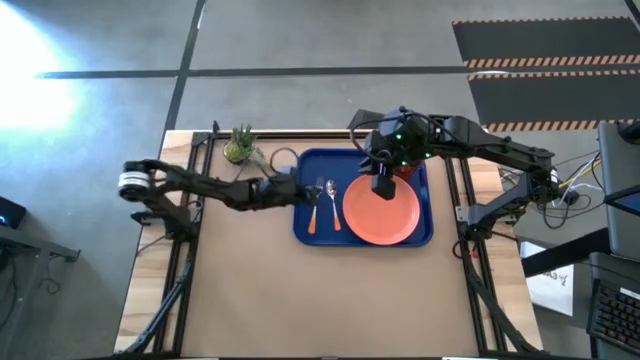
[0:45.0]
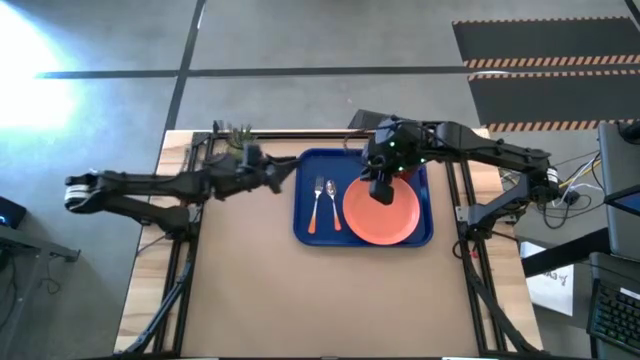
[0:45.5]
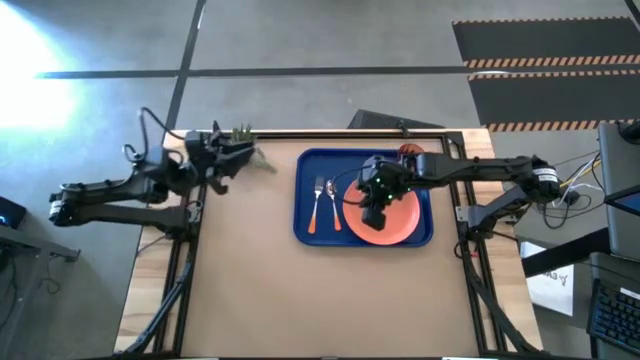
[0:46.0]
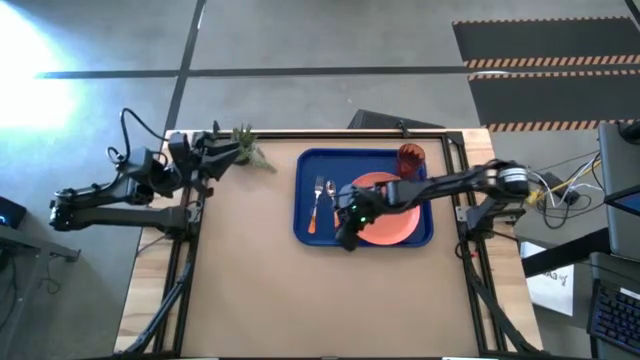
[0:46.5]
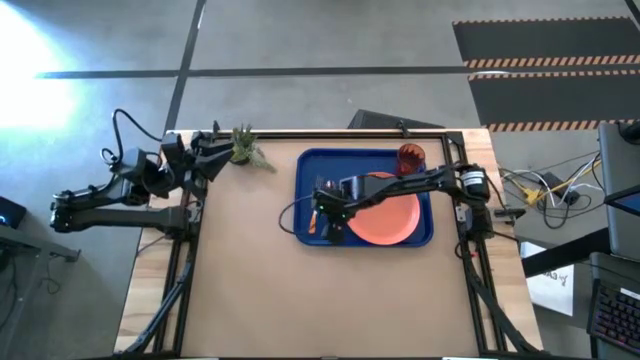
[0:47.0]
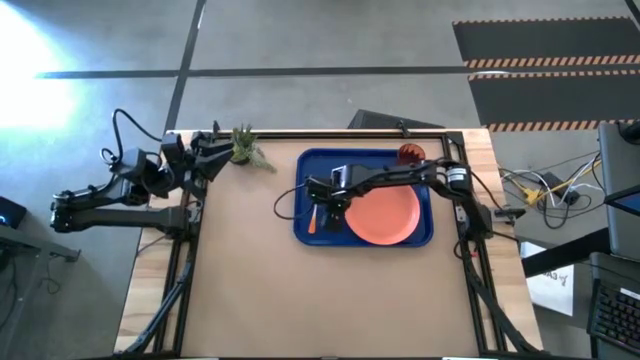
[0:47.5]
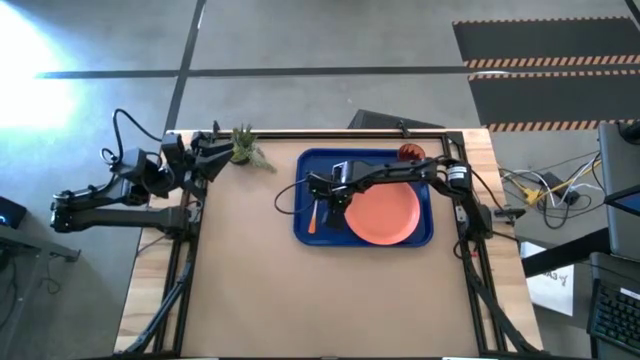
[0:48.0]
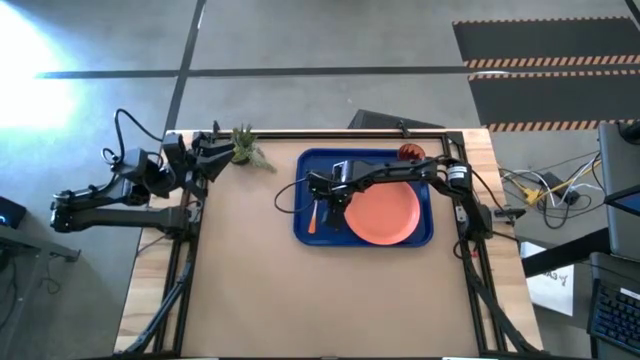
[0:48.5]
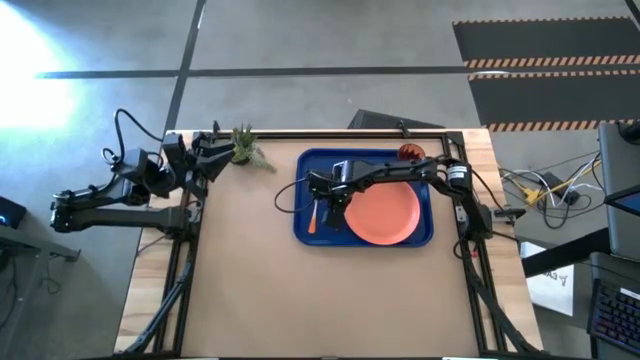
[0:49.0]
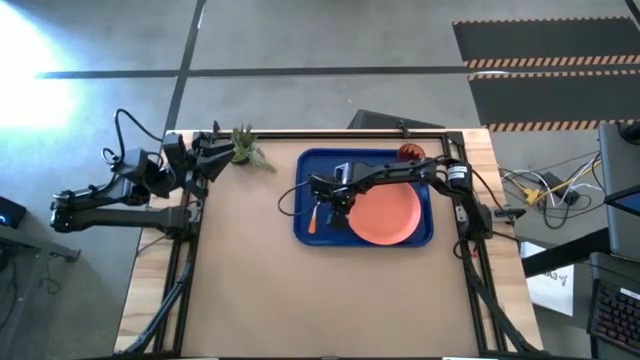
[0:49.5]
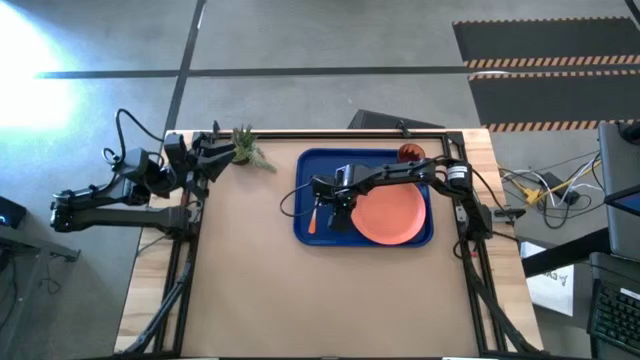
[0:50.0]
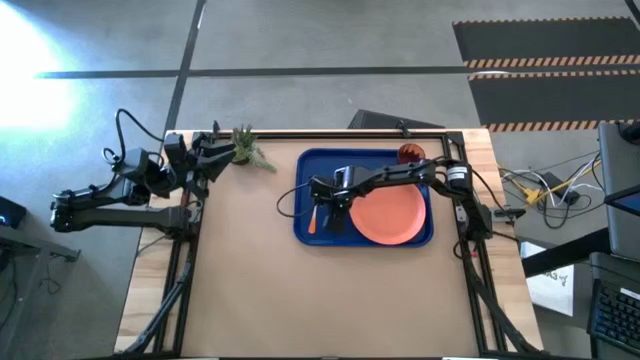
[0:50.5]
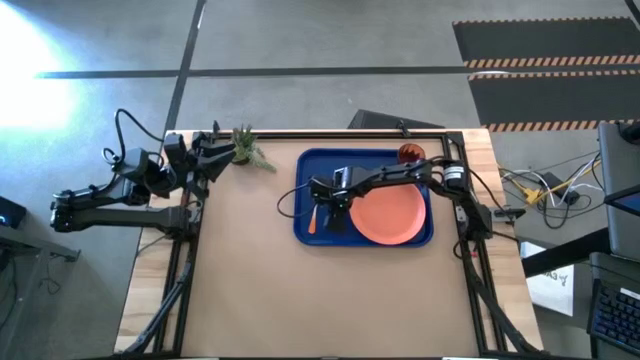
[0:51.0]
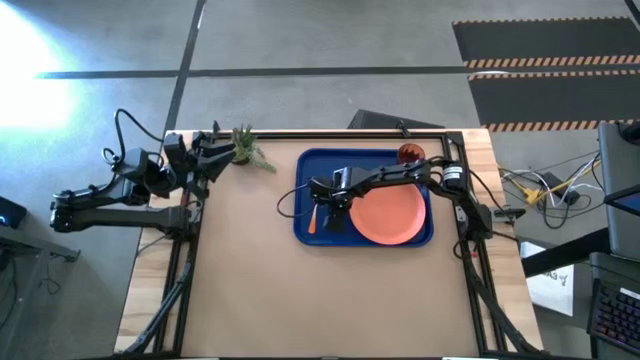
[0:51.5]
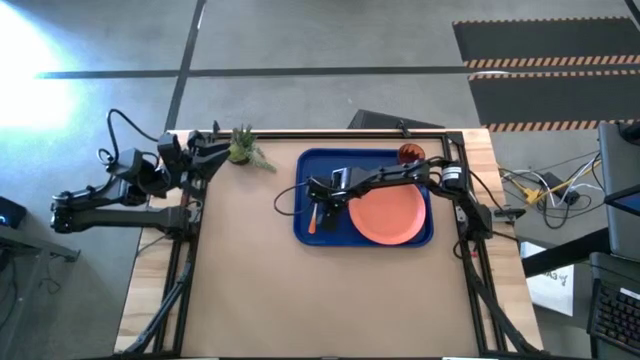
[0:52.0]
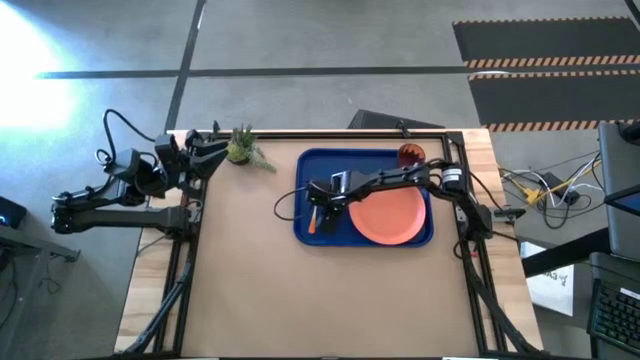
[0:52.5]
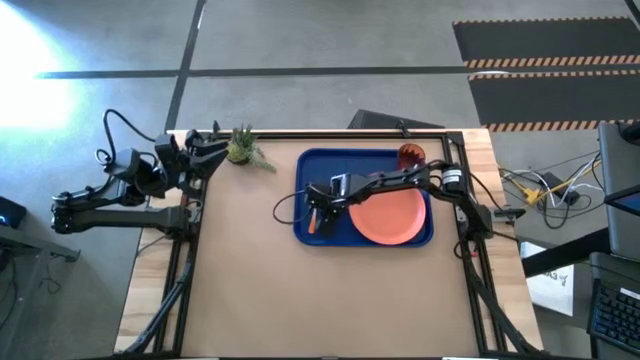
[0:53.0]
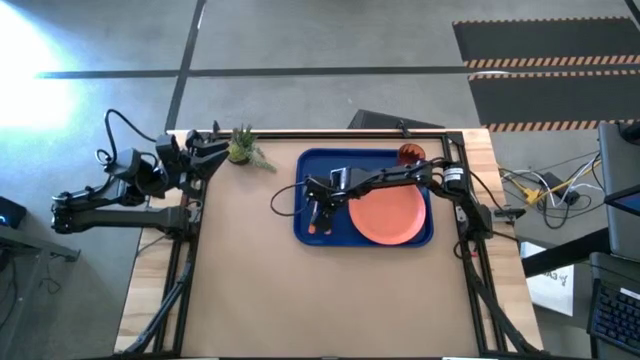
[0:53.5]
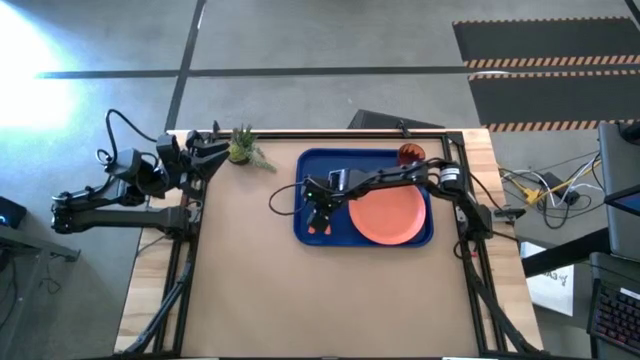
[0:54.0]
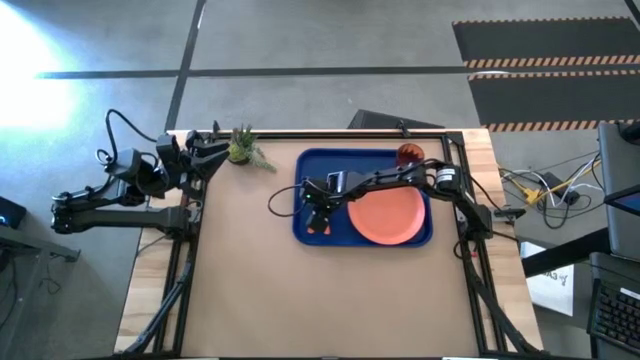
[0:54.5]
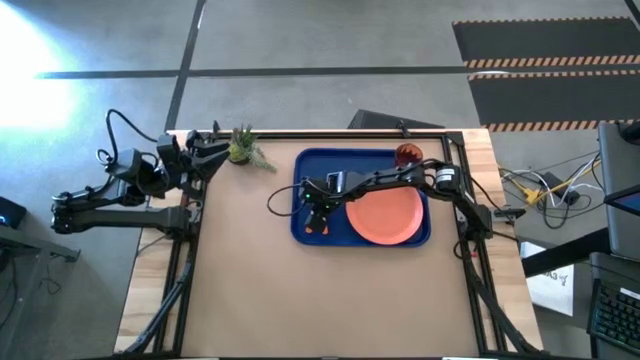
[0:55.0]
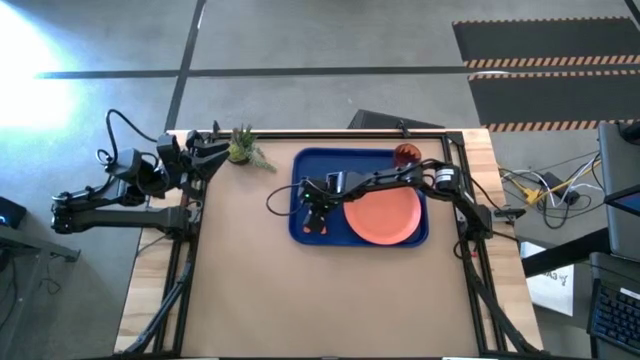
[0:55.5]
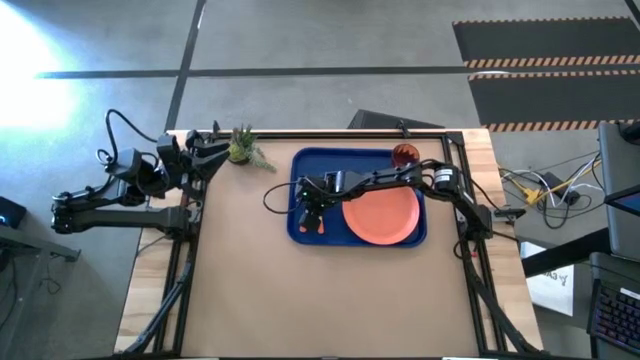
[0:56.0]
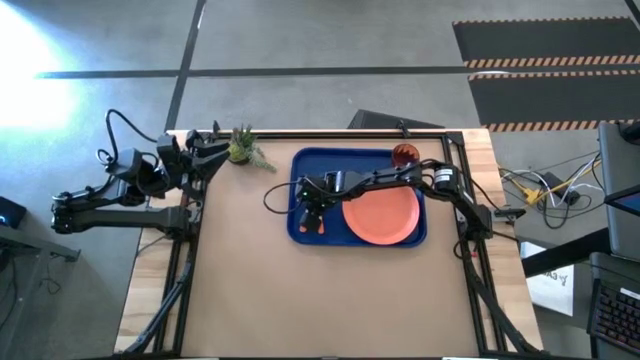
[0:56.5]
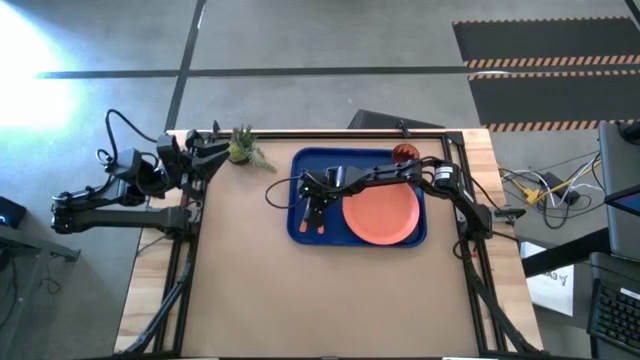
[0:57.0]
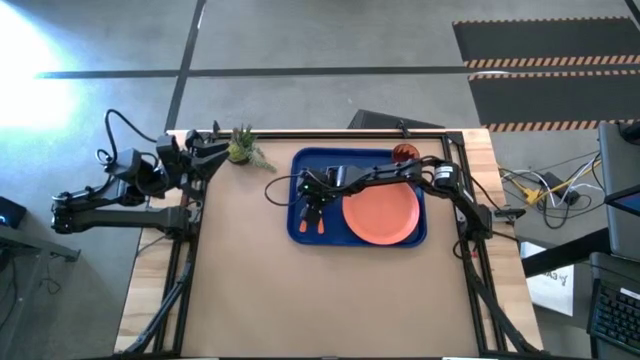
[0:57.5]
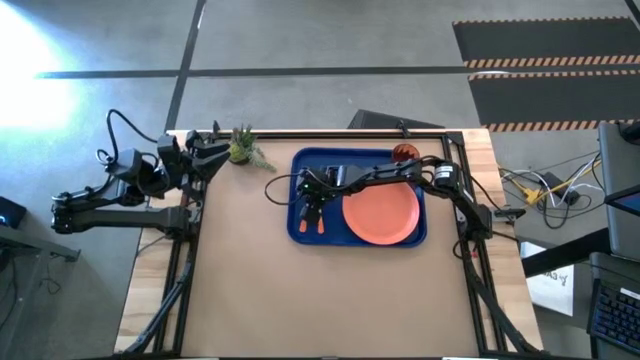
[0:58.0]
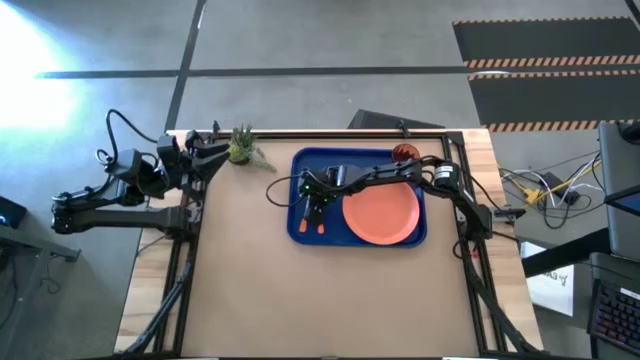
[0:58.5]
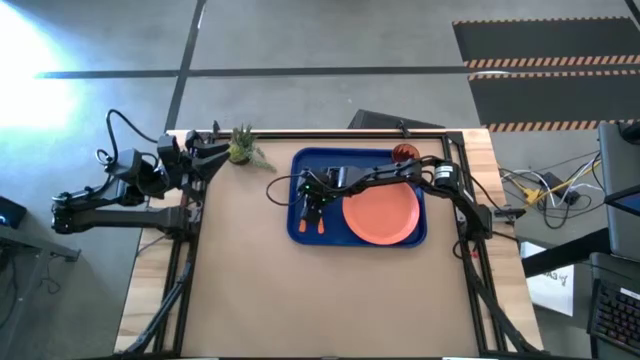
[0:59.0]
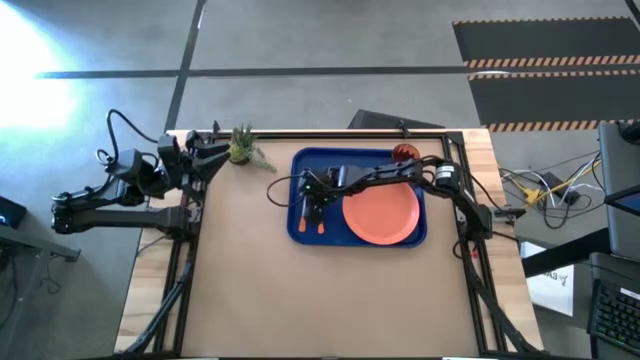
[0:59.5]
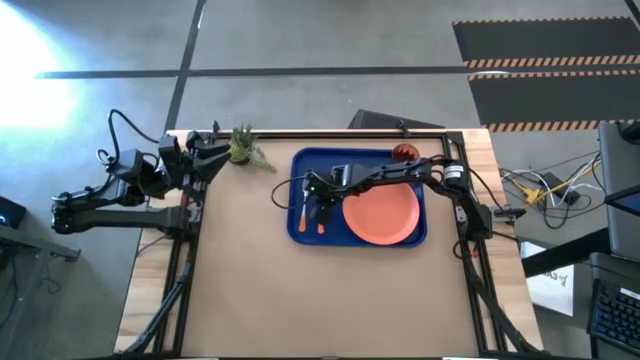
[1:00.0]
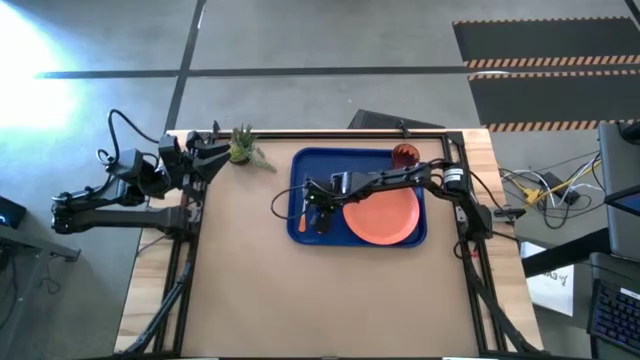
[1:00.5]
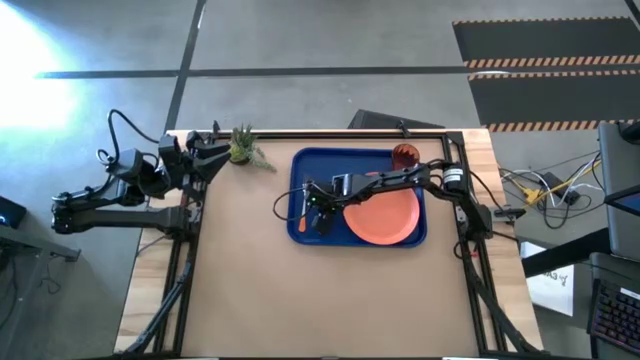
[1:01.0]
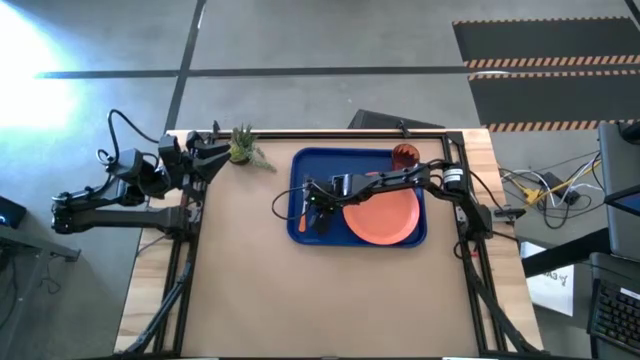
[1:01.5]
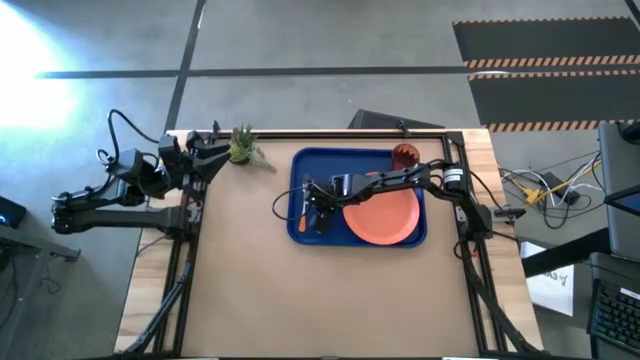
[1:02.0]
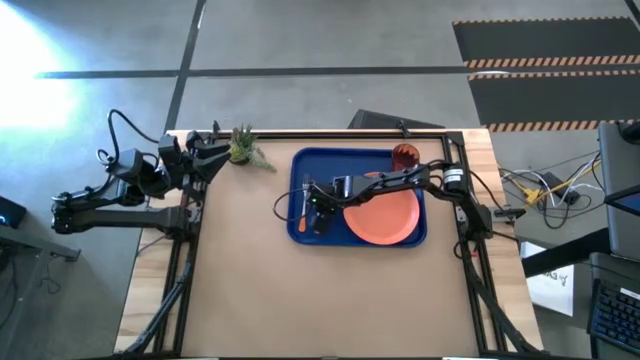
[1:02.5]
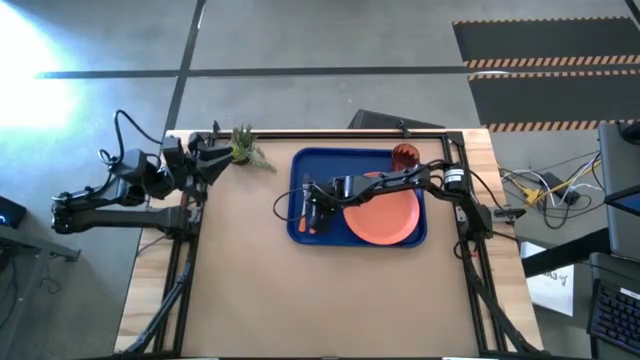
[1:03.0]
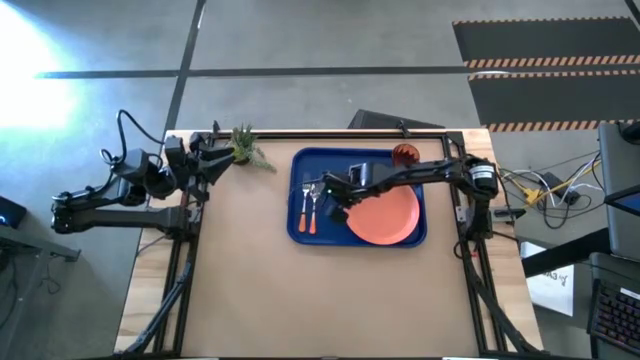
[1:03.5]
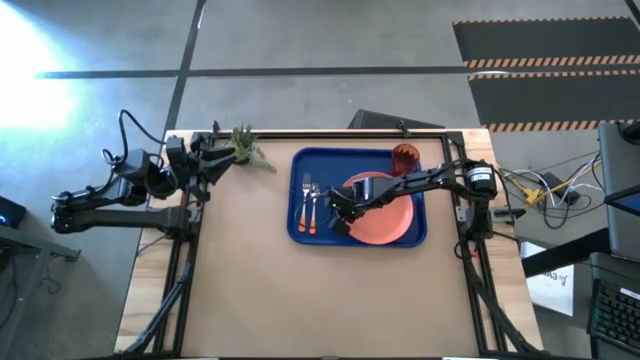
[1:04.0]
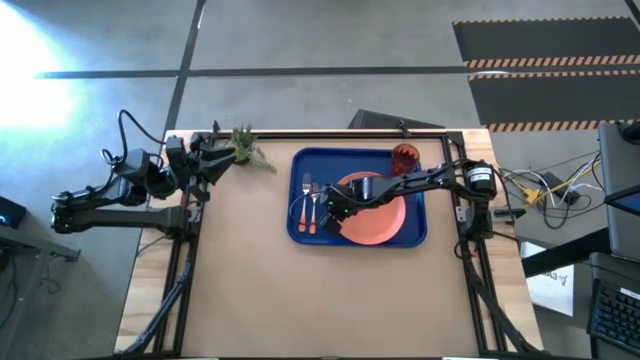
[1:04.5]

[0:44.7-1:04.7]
Task: Pick and place plate/cup/fork/spoon on tray
Adjust the silverware and plate on the blue serving tray

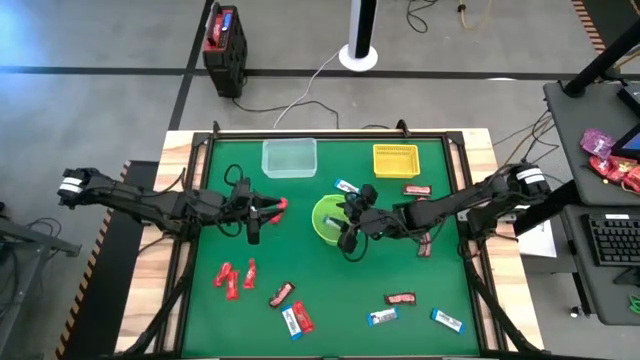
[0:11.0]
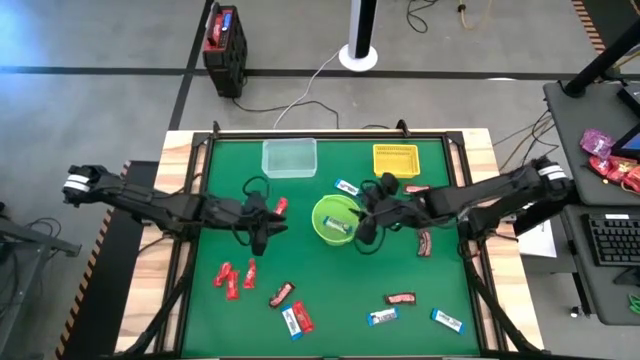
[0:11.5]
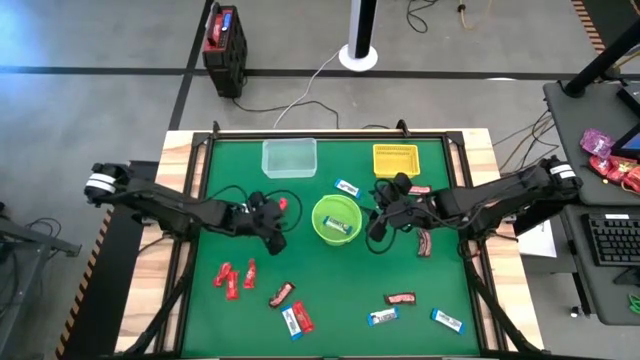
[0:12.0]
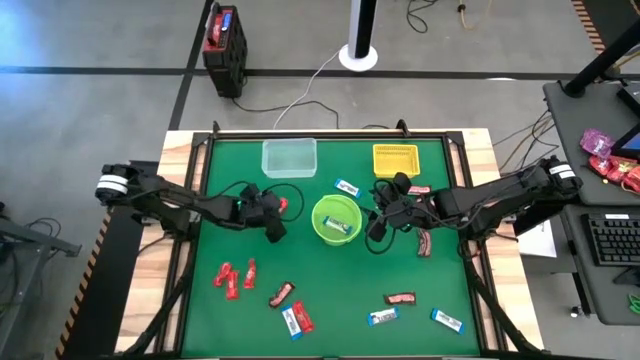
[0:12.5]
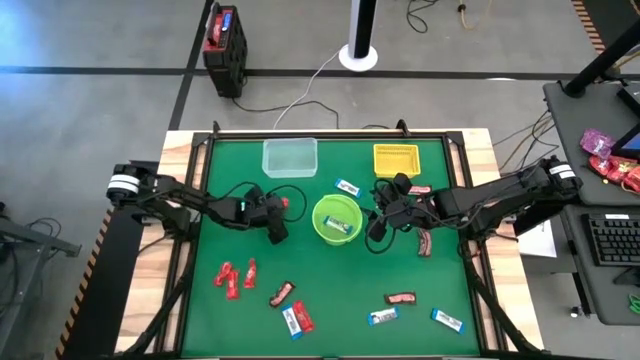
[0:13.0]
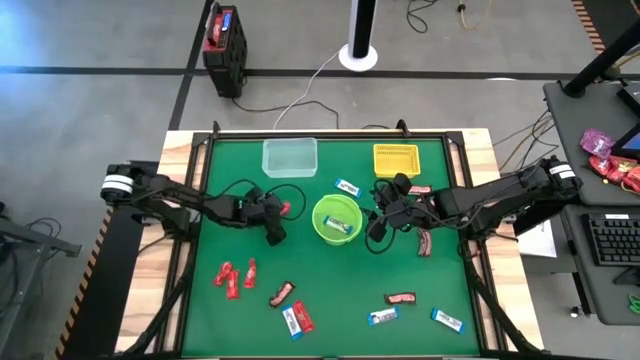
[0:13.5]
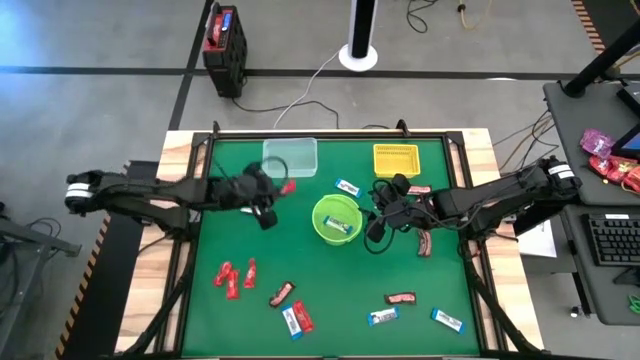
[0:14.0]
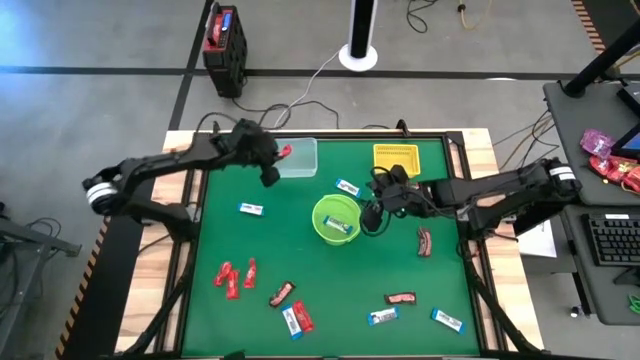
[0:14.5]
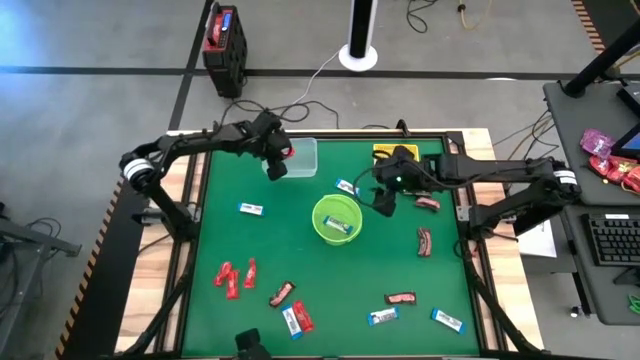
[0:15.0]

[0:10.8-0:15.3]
Task: Sort candy by brand, put in halloween buckets
Put the red chocolate into the transparent bin
